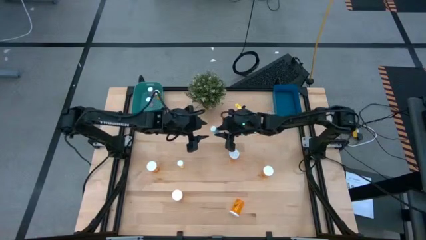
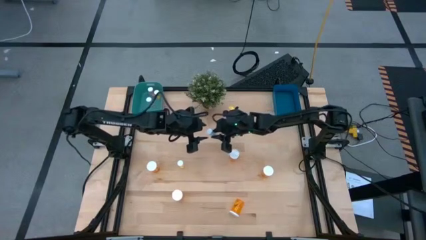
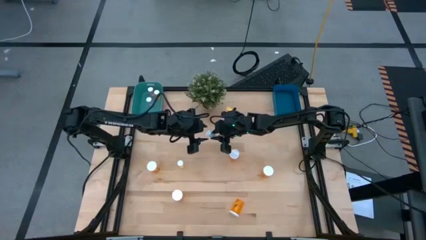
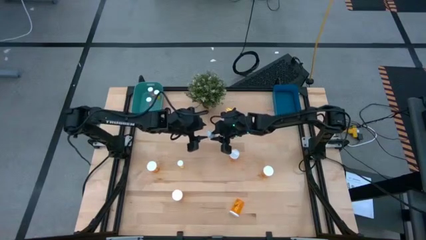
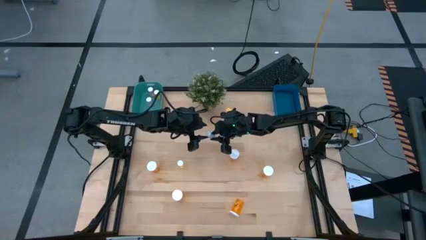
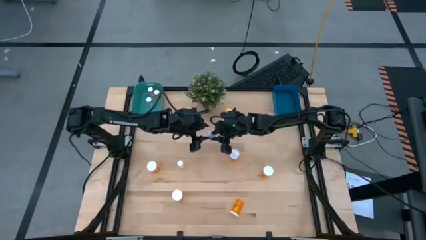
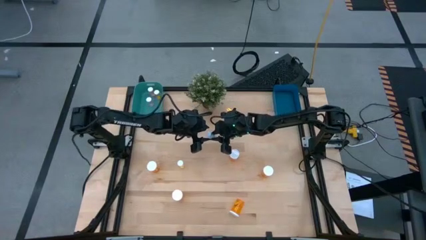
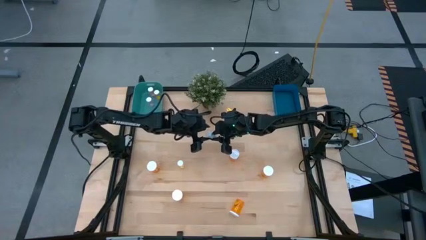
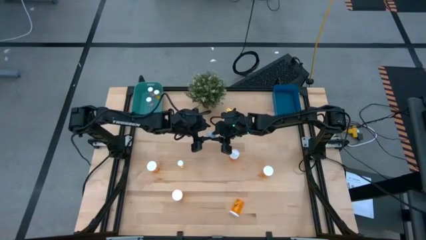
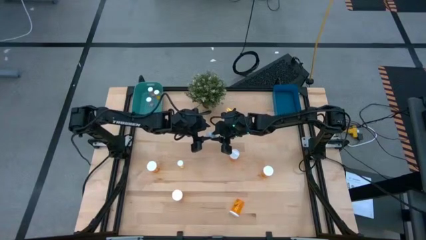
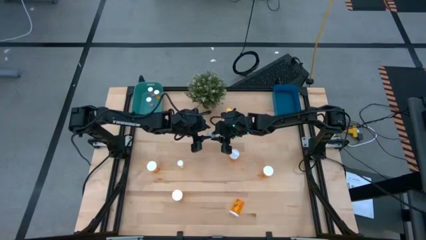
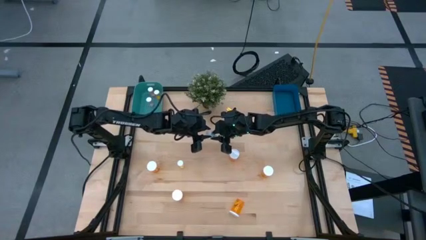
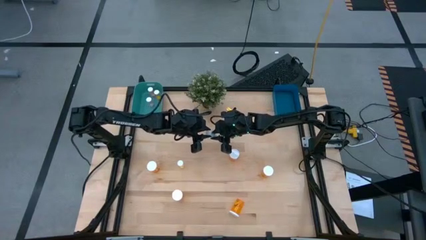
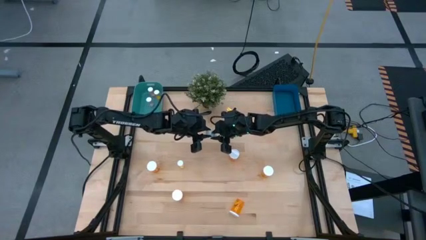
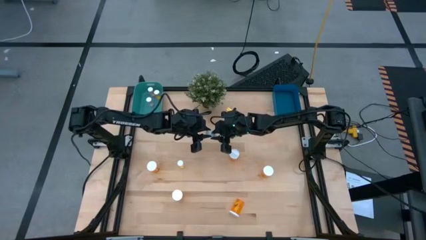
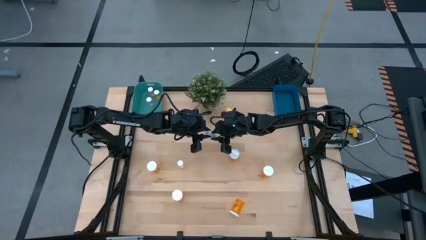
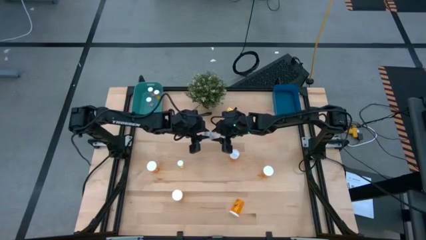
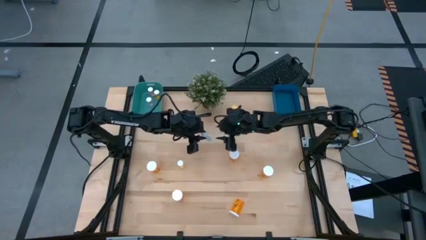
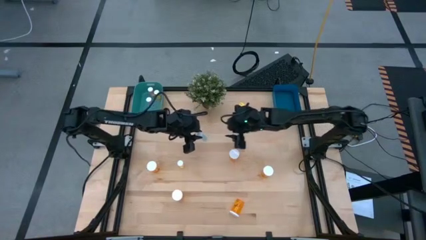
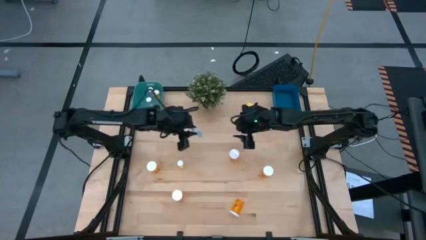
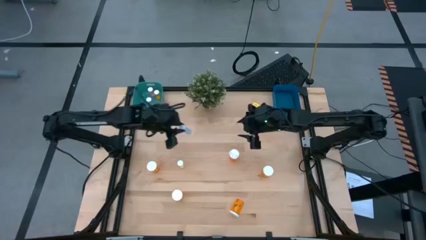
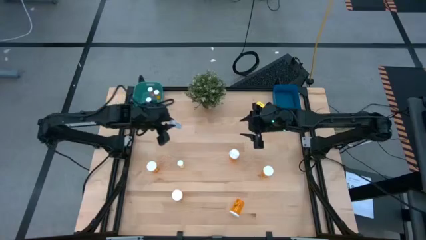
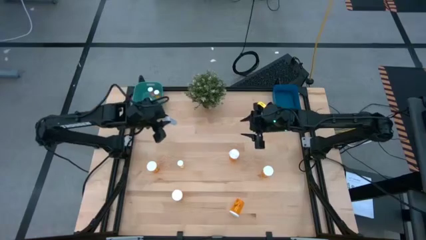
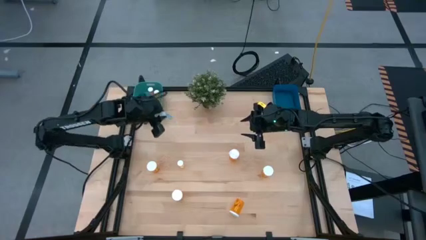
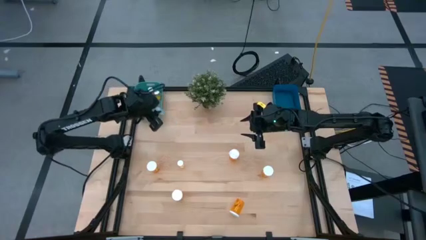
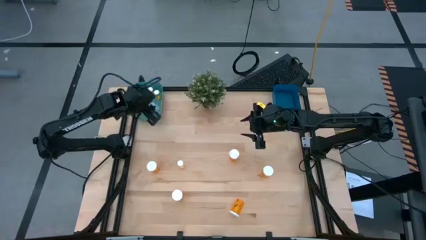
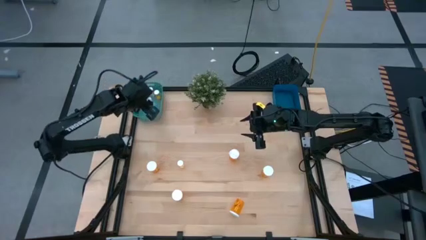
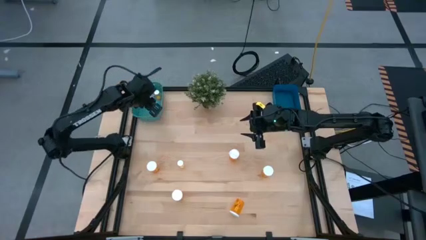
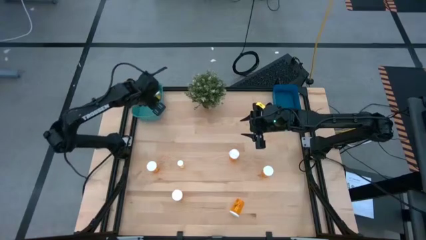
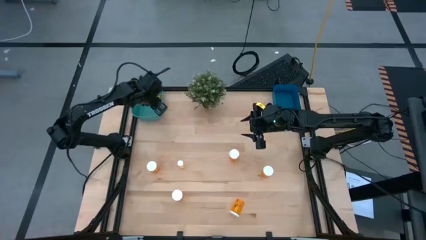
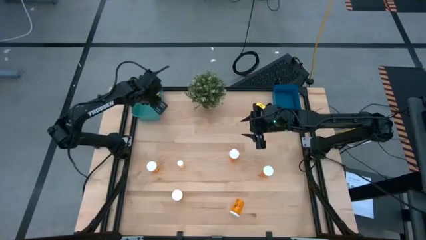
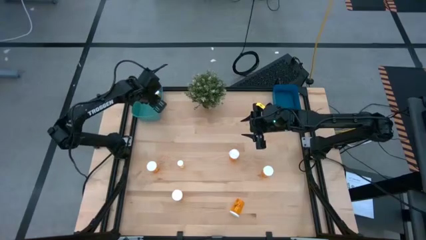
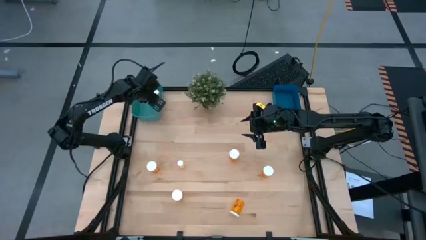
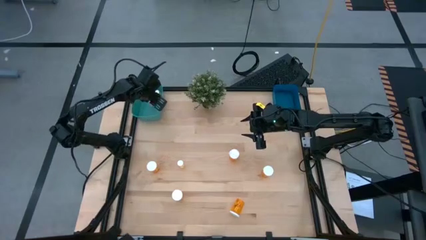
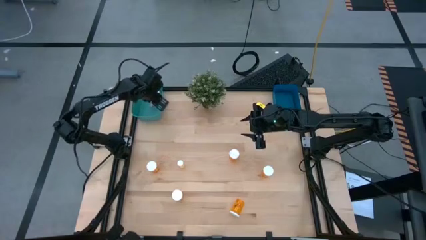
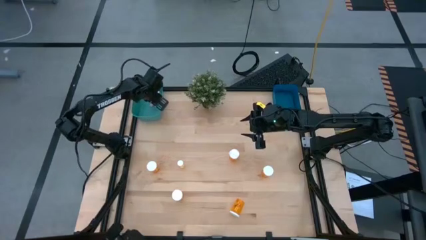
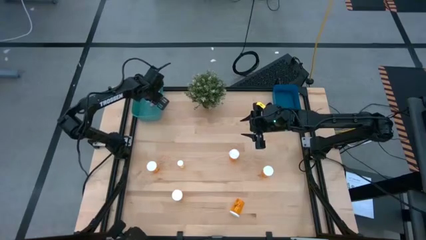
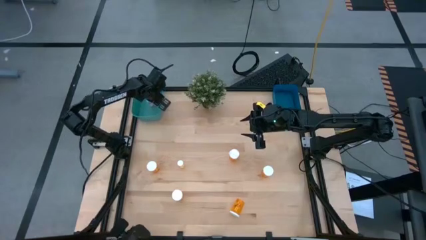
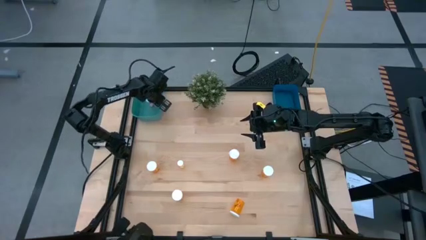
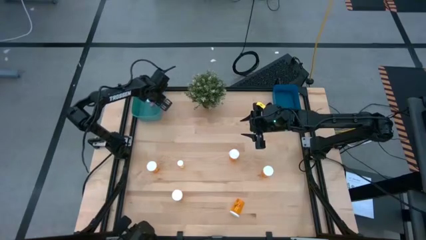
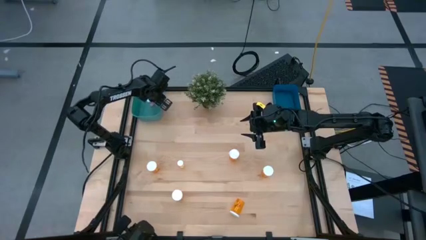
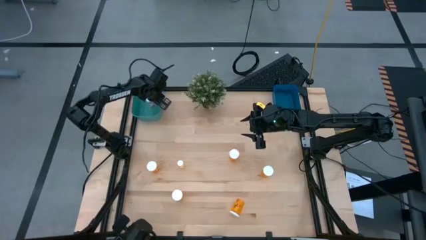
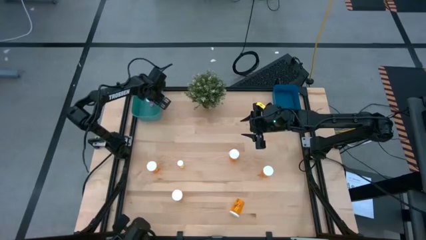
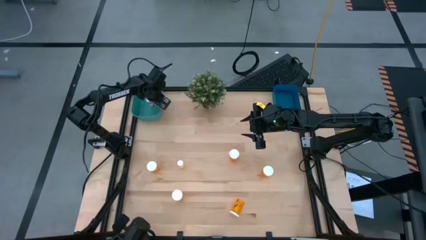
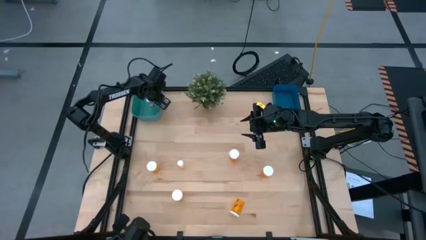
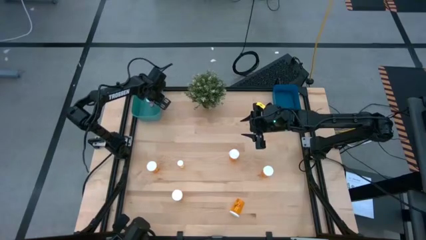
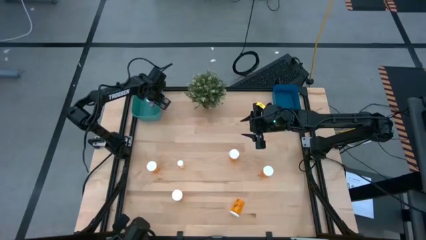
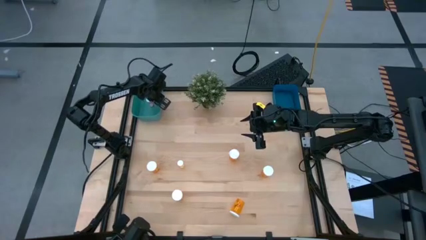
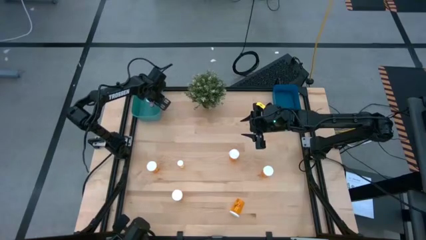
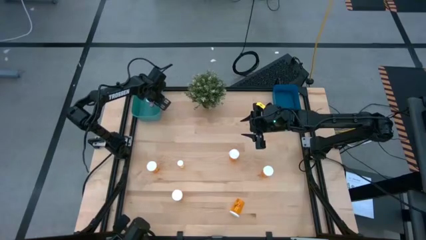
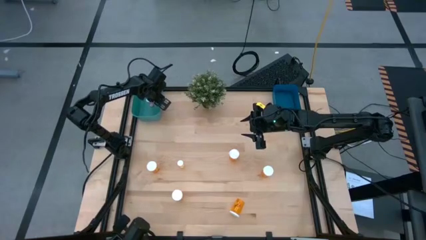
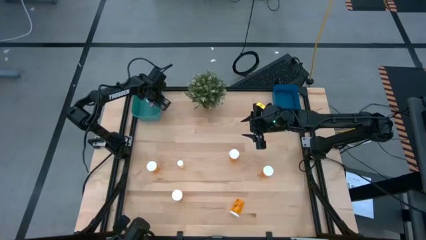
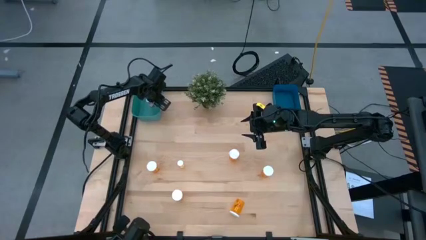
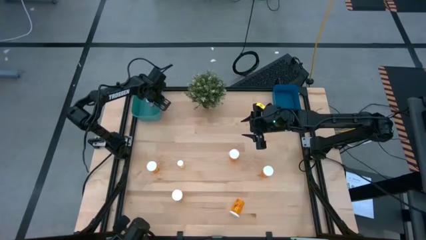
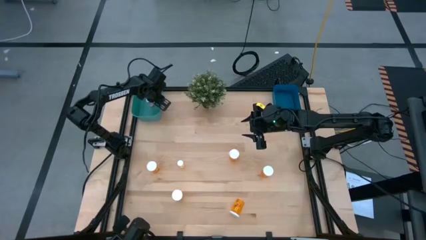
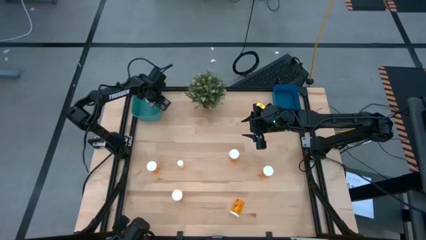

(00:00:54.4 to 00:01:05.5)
Task: Pick and place medicine bottles into bin by pill shape (circle, oval)
Put the blue pill bottle into the green bin

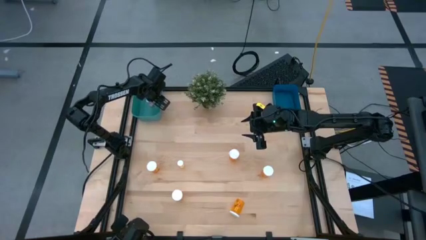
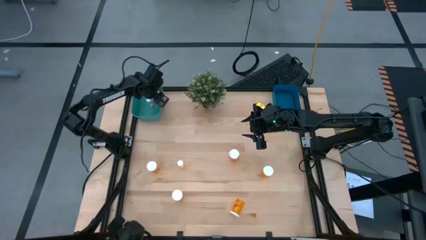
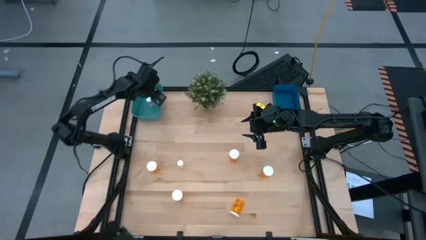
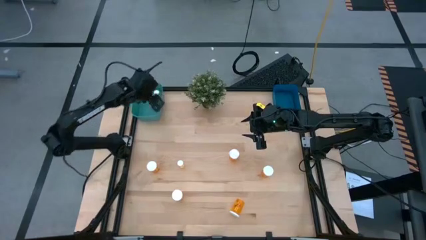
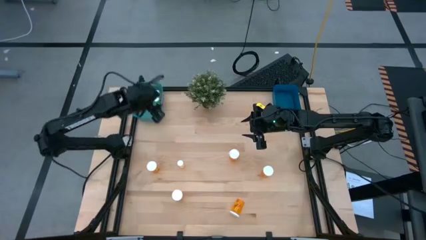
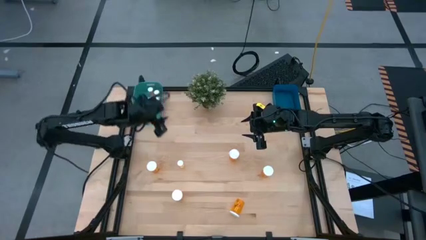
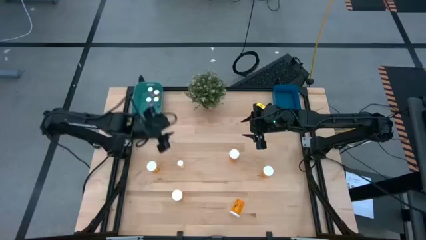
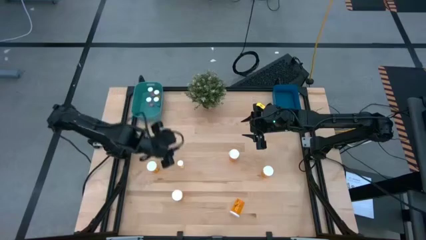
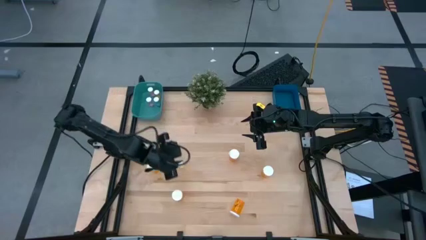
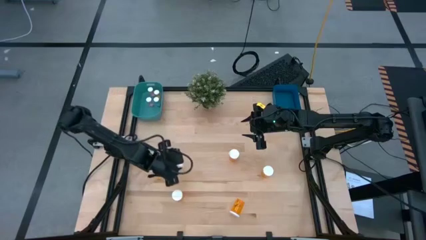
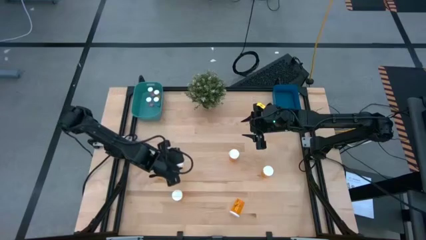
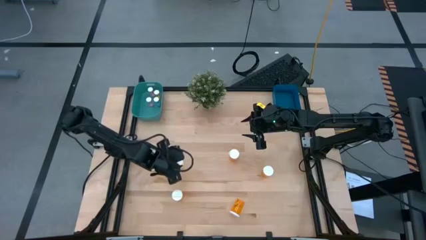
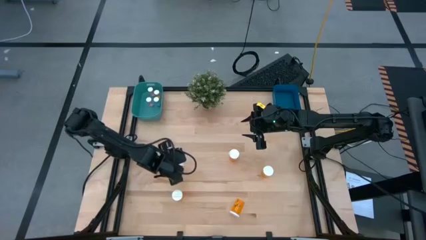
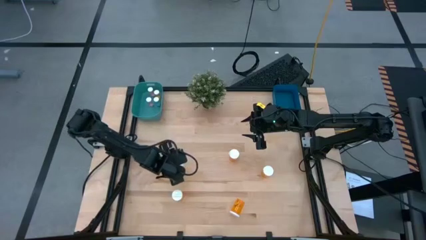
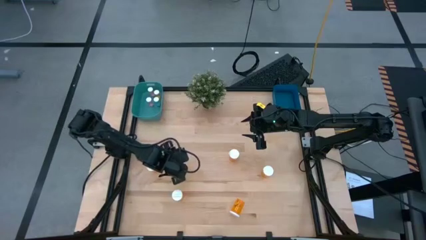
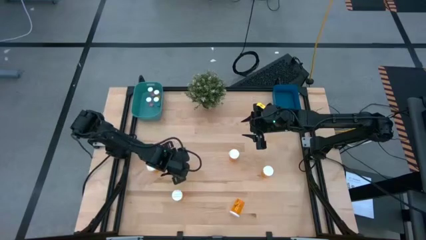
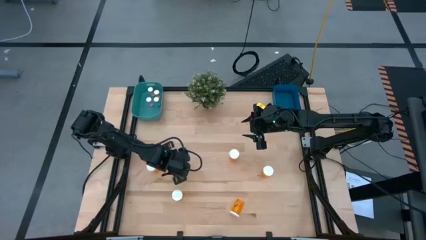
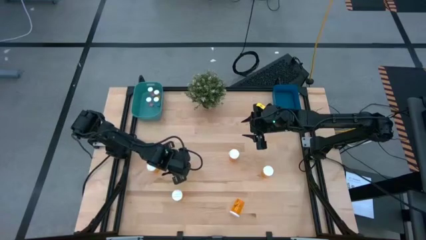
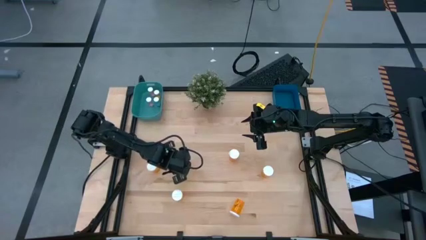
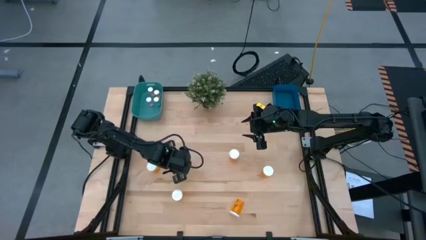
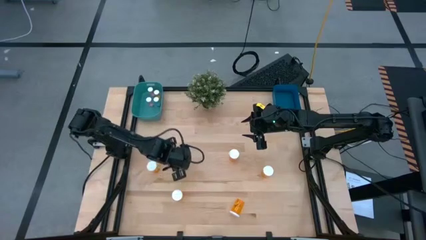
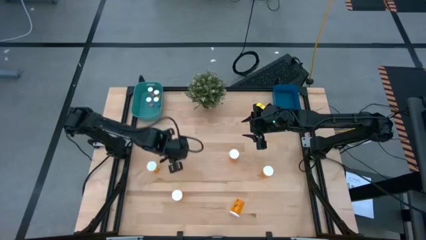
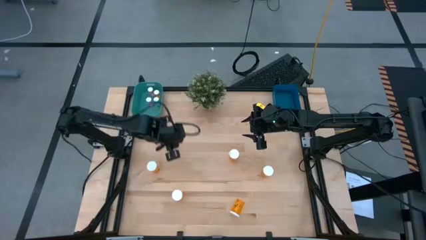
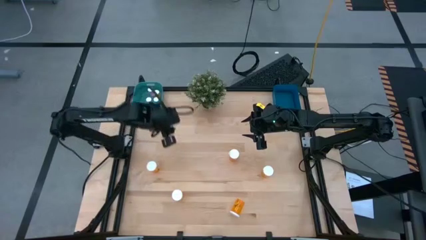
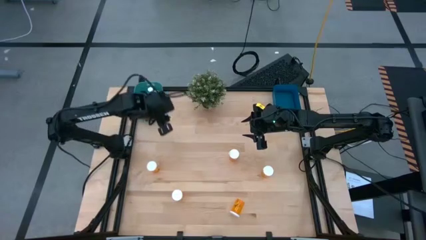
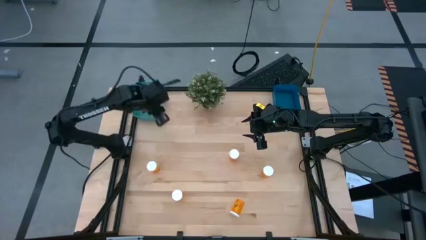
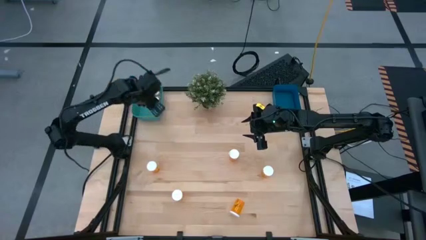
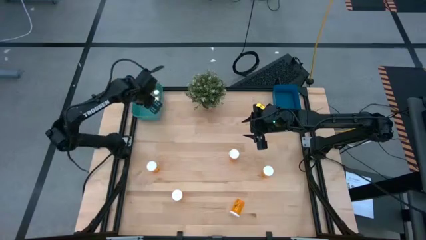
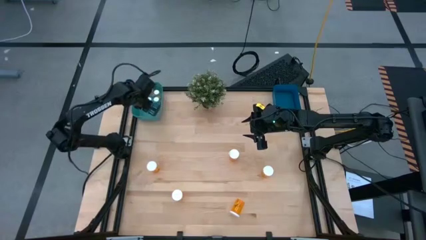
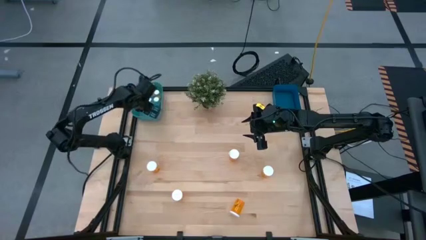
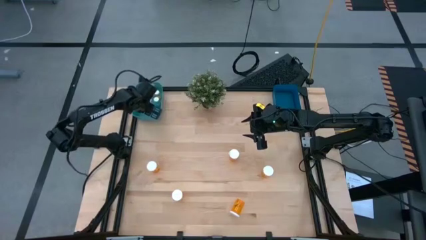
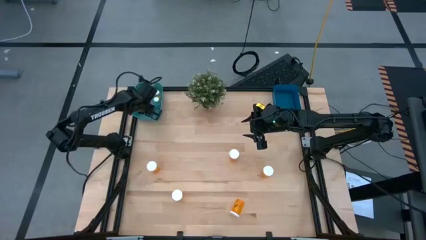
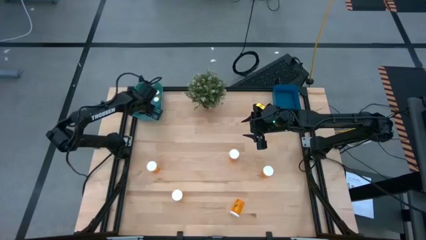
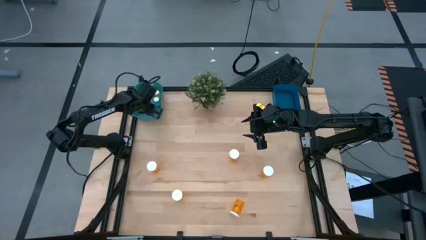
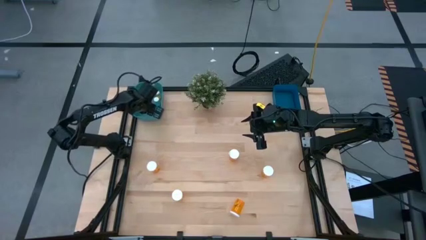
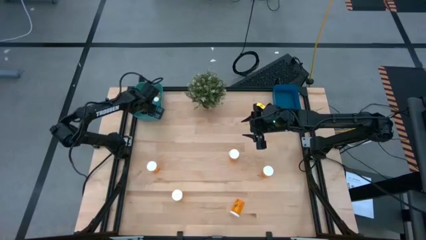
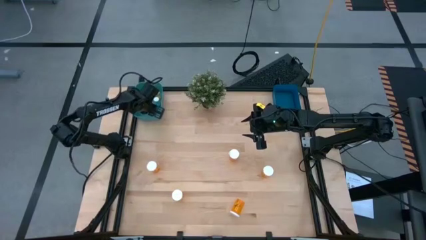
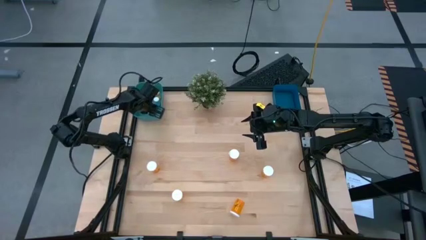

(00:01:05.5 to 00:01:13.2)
Put the yellow pill bottle into the green bin
